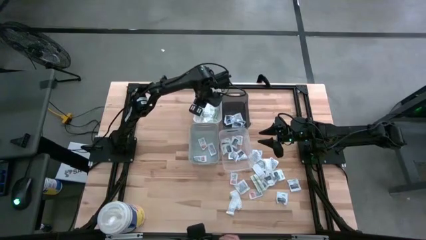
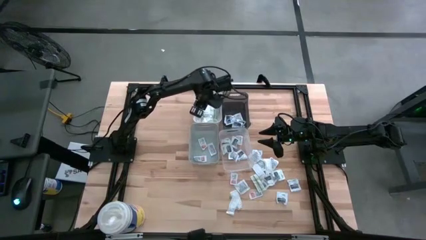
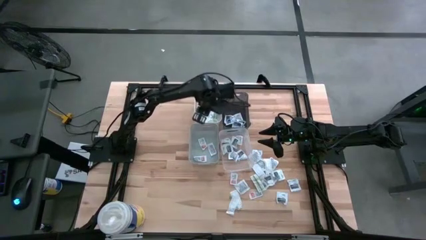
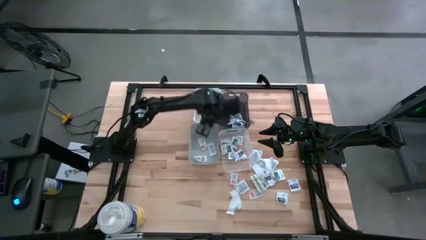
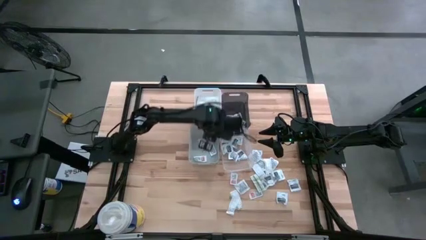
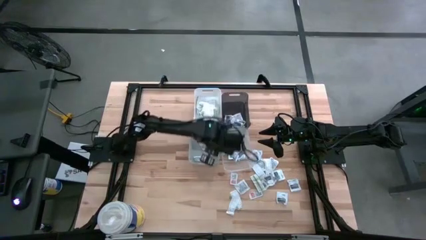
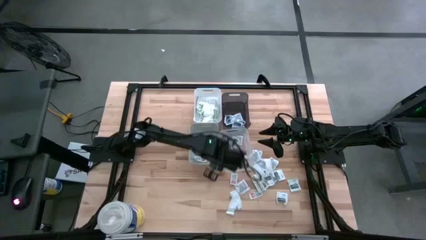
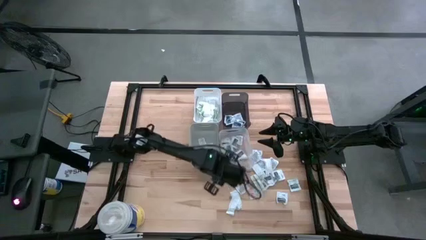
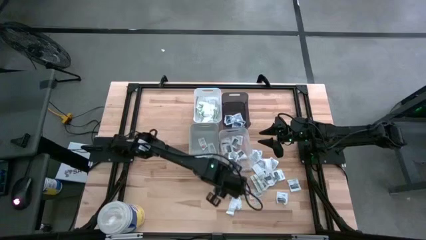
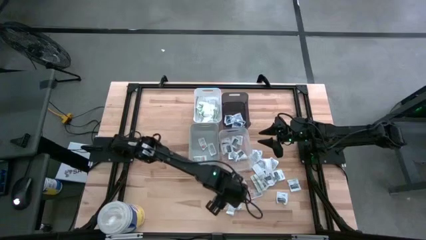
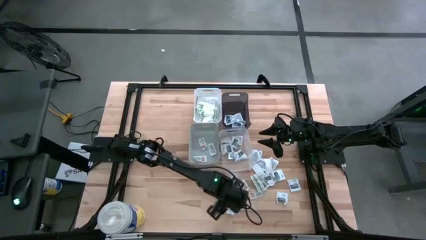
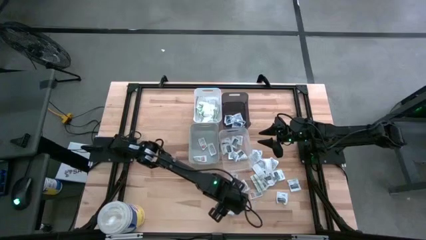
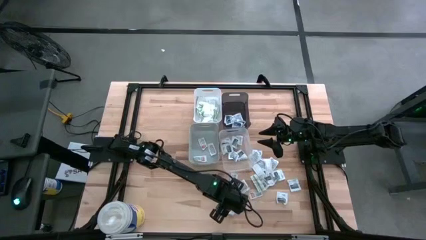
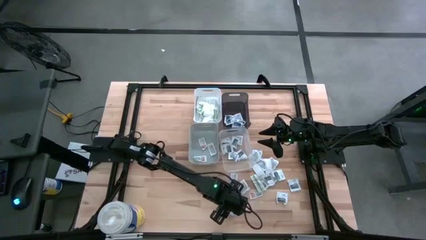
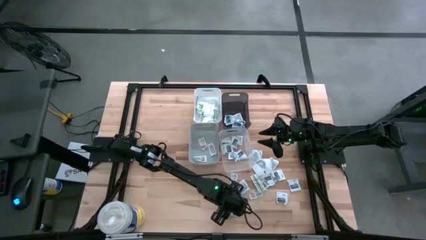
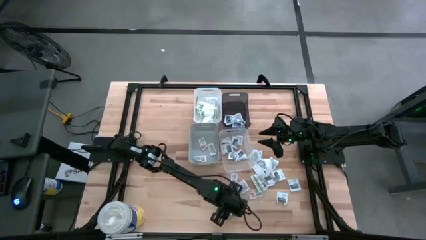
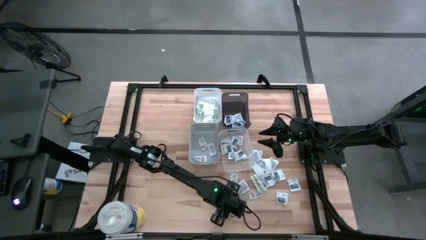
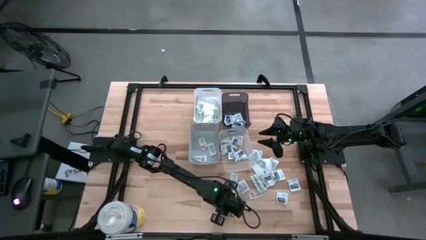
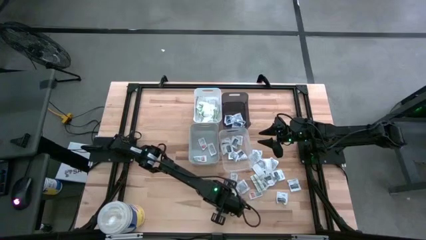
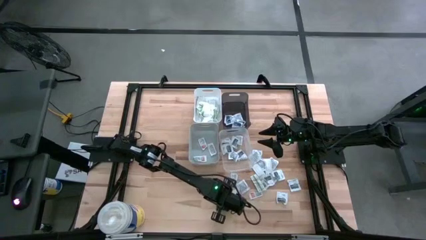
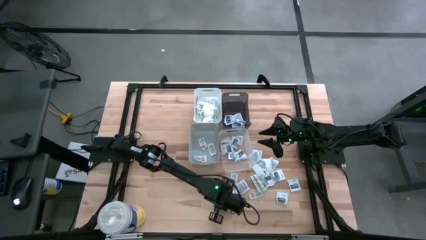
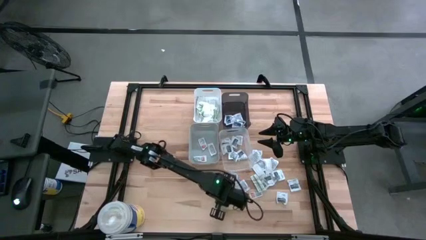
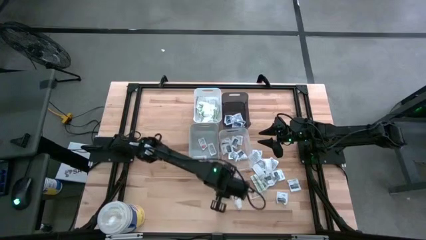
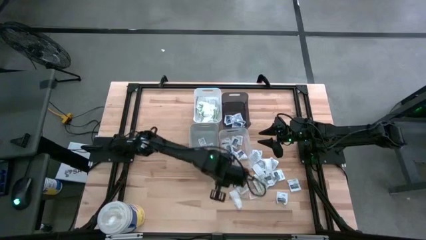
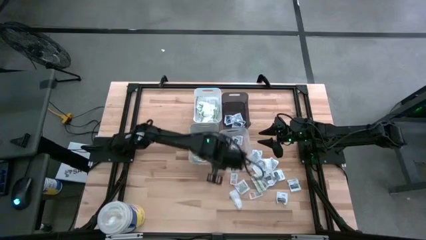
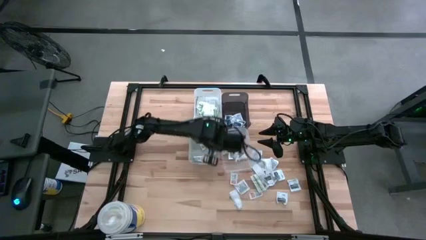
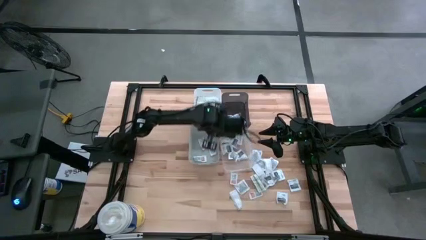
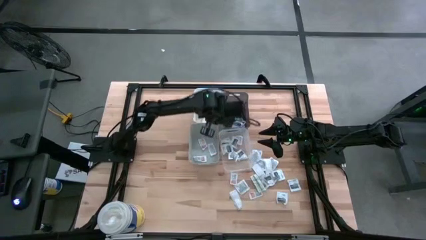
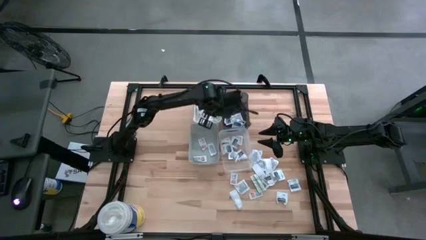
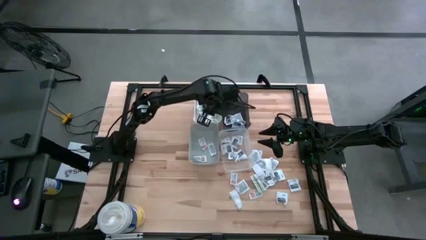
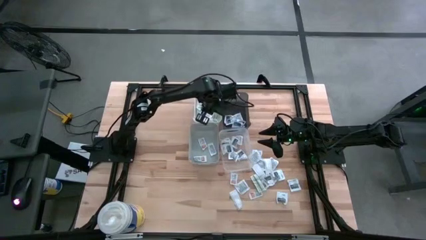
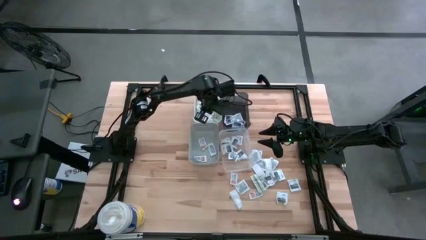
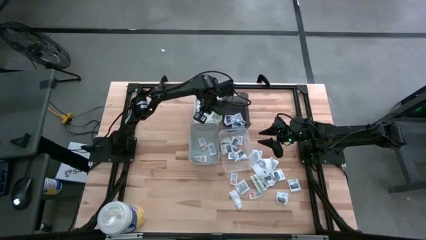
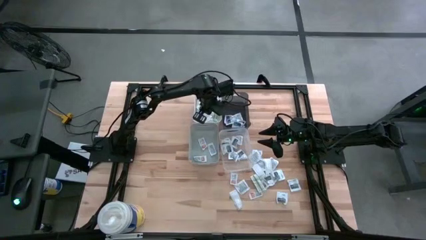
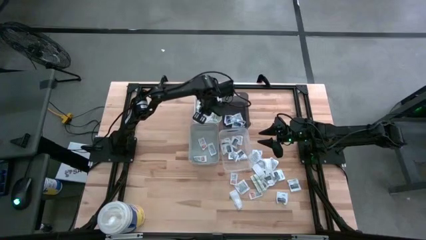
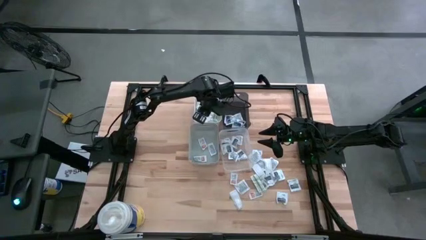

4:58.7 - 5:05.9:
Task: Pick & Place First Aid Supplies
Put the green bandage pack into the white bin

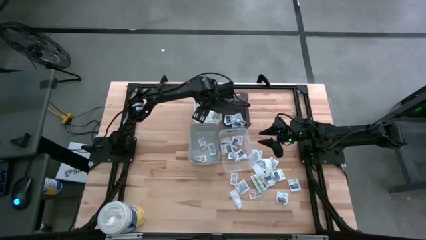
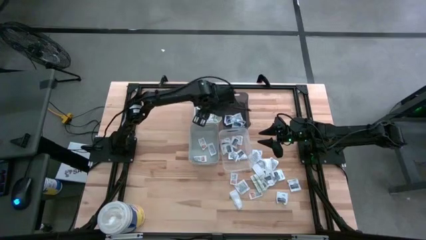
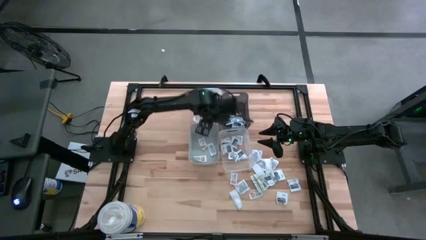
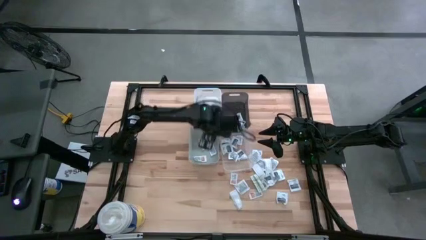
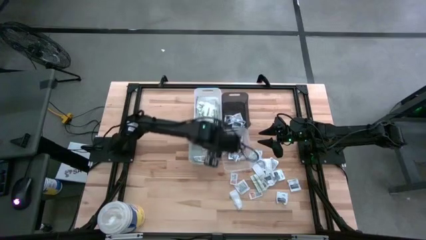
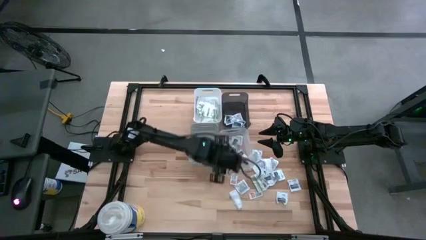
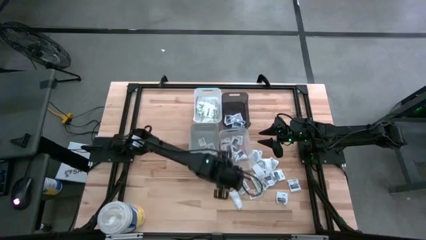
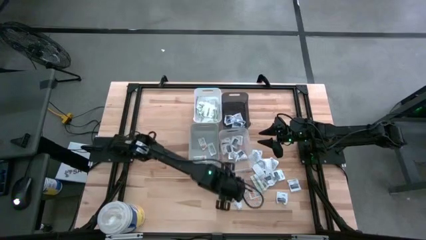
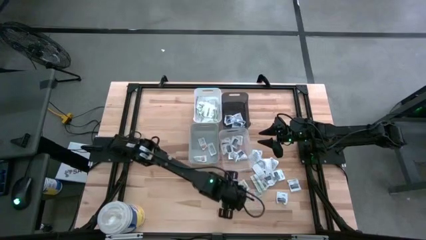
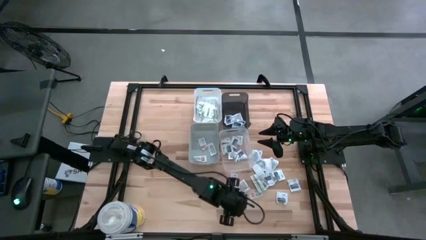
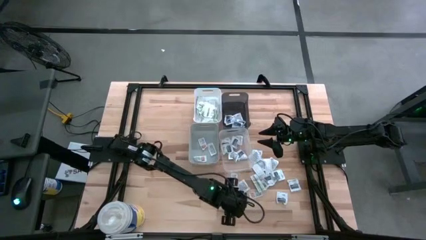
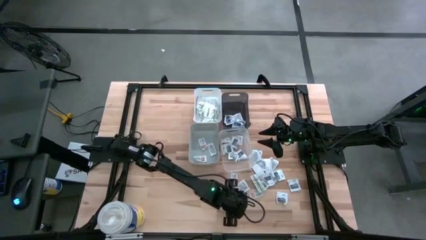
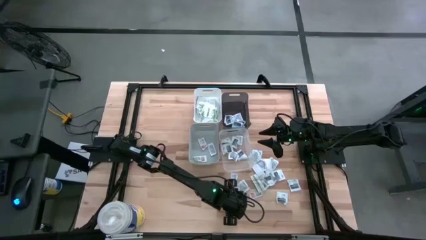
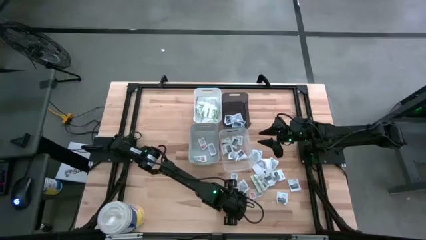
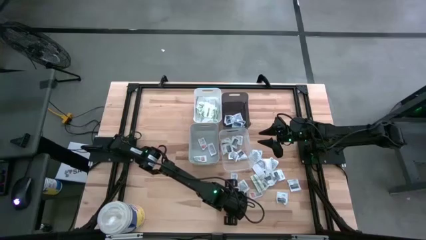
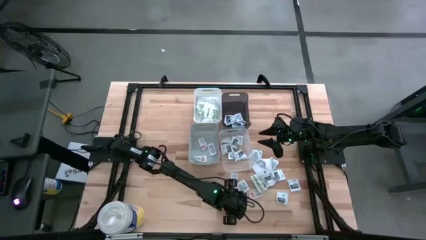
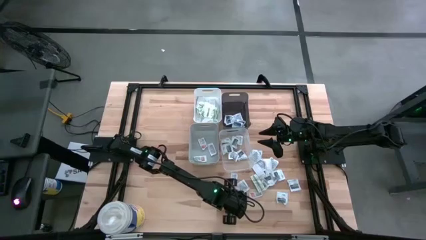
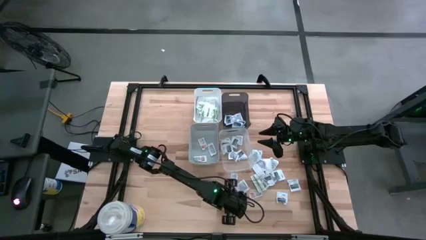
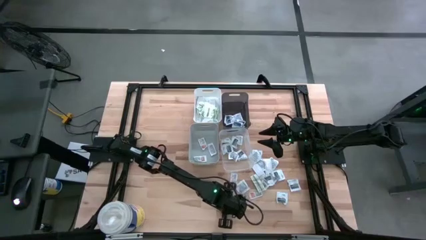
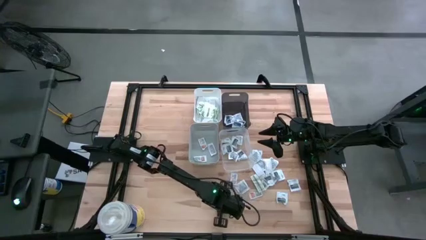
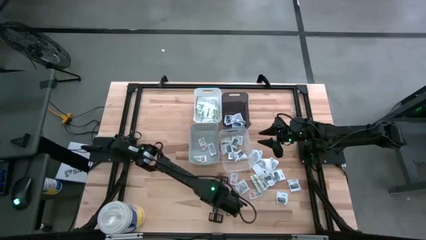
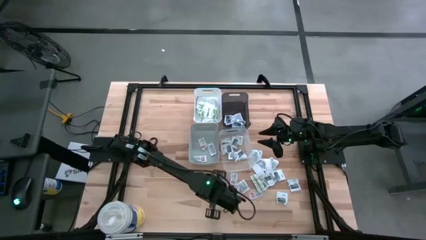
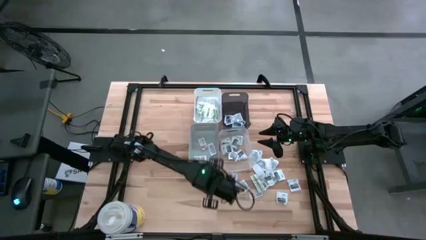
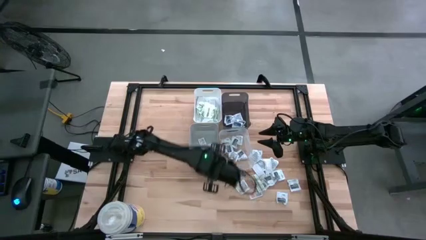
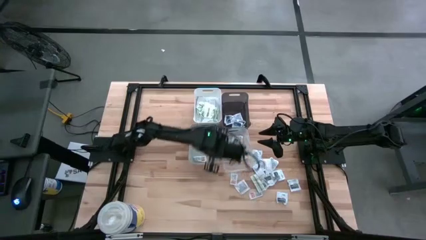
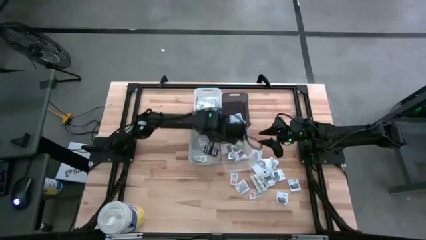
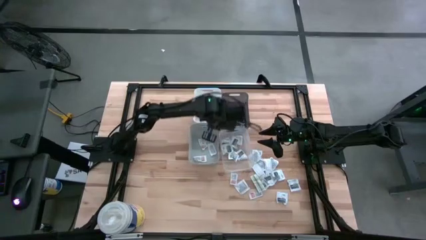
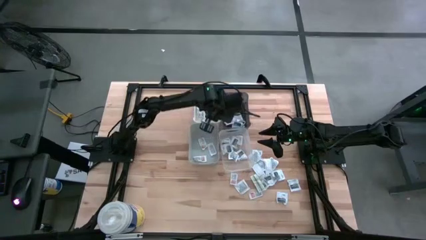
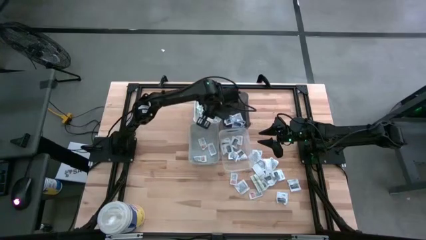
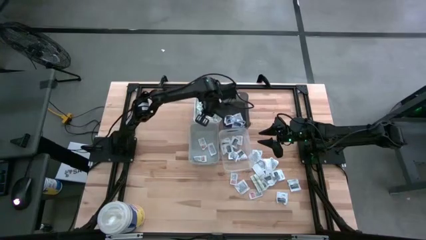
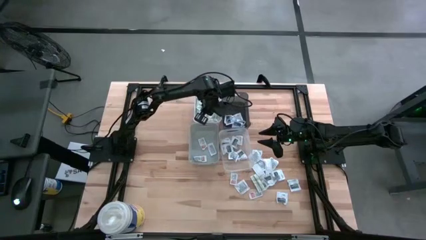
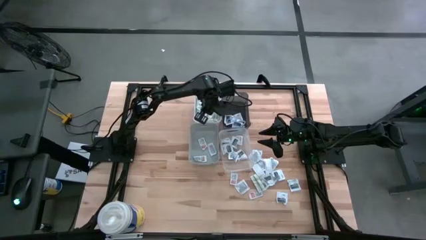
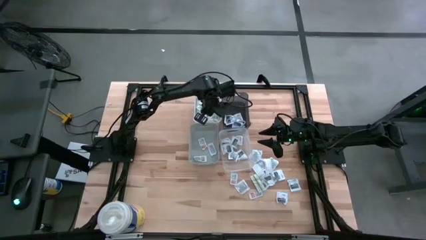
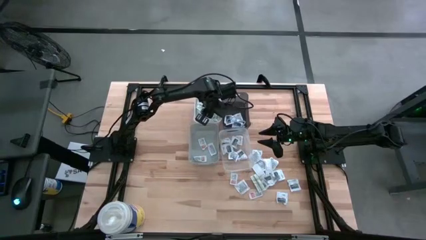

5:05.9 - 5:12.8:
Put the green bandage pack into the white bin
